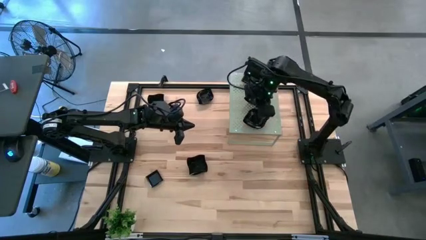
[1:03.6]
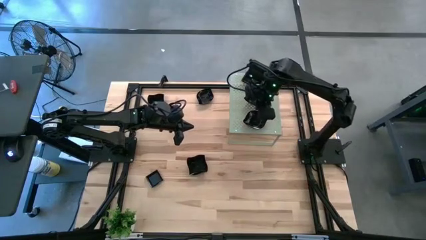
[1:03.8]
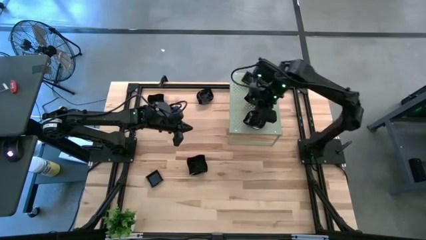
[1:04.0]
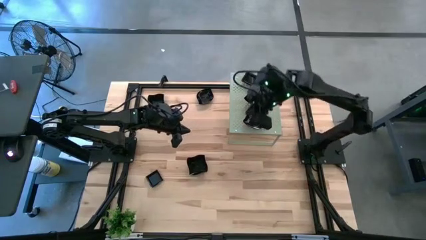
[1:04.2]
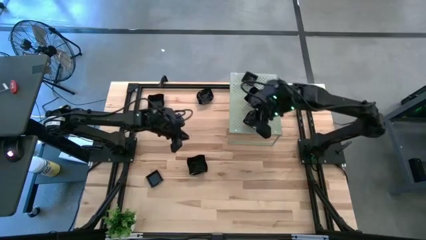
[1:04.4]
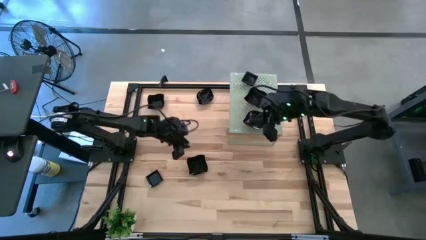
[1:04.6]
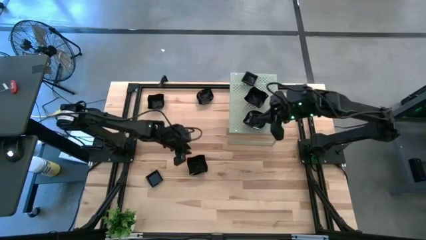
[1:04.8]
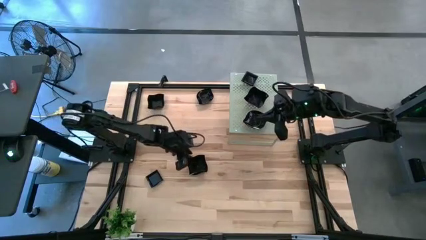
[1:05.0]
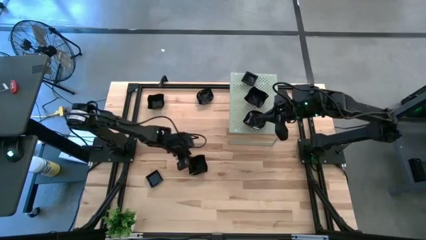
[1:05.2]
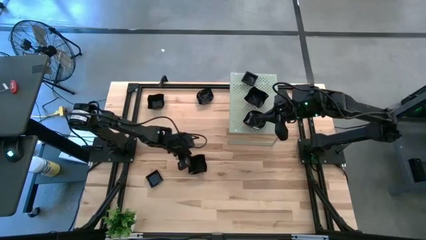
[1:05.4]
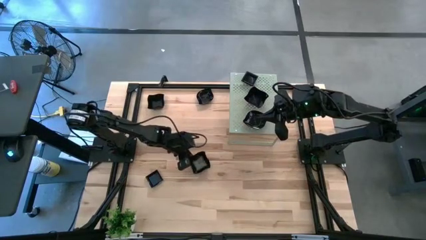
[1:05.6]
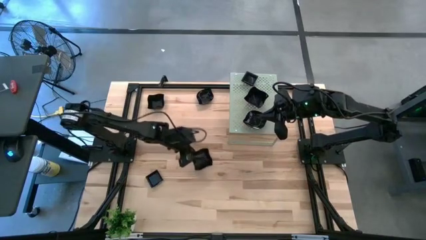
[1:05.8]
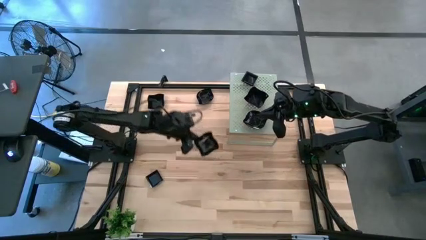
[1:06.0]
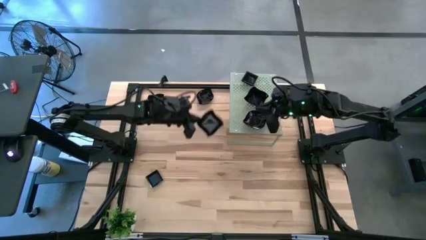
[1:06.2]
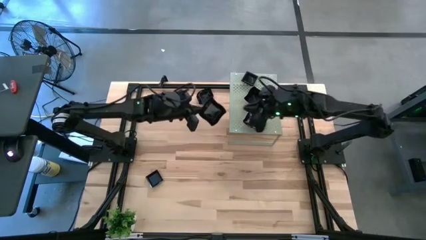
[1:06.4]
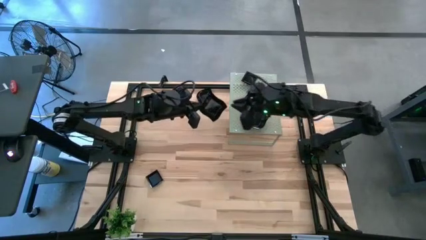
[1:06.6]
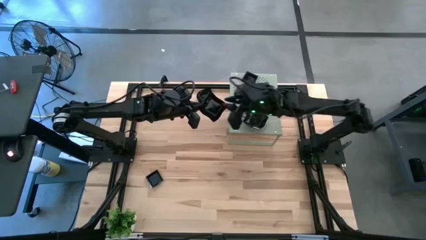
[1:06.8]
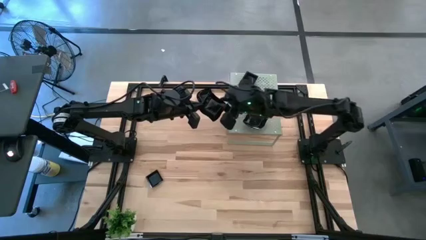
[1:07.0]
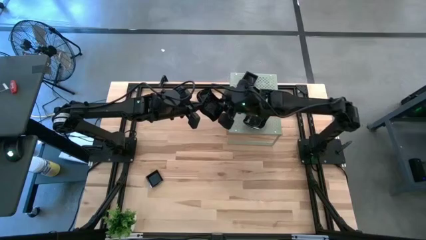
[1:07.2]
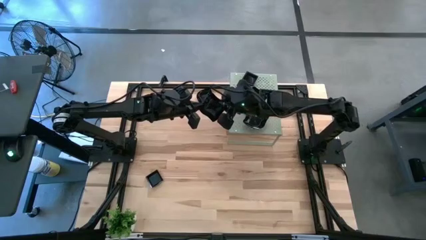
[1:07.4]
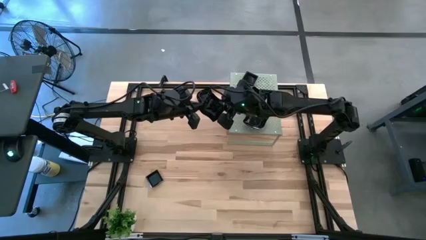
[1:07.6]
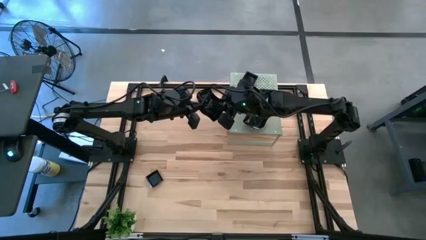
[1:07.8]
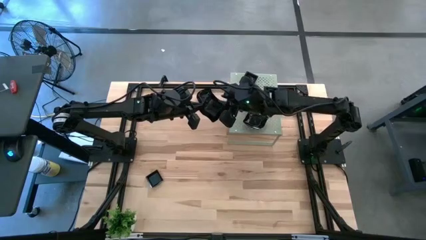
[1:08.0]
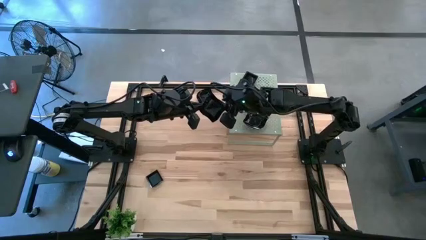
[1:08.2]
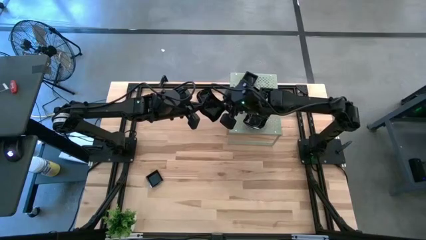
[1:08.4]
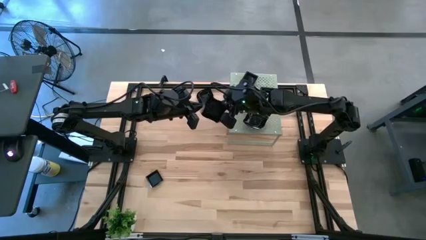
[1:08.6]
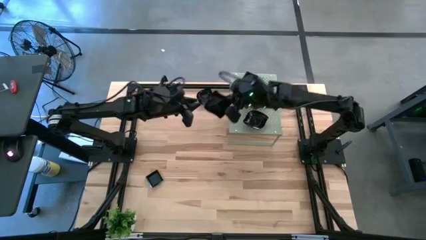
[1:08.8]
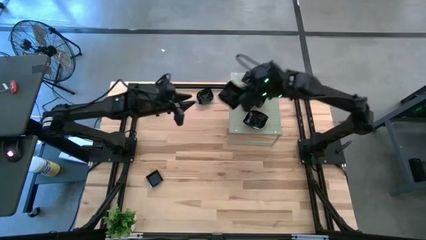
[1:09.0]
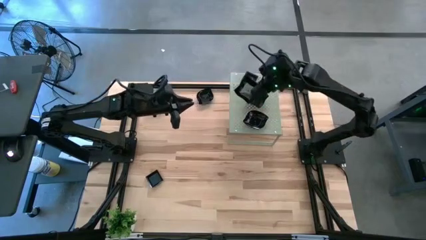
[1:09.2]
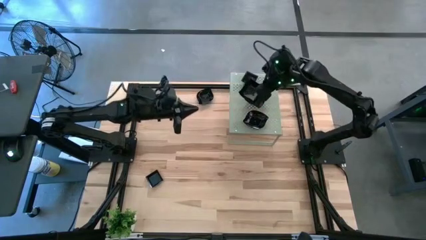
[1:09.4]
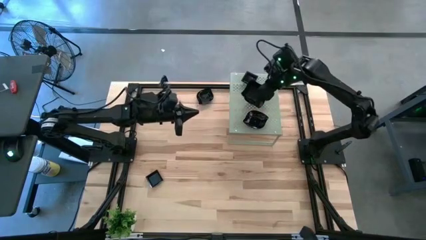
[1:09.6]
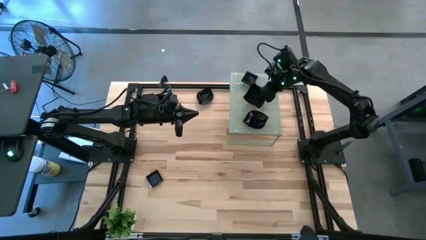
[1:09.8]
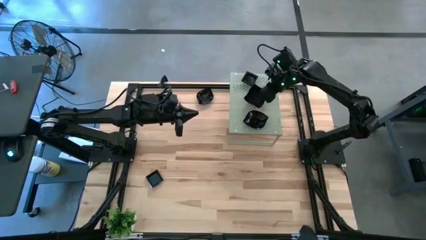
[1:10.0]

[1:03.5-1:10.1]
Task: Pick & Place Mini shaped plates
Stack the black distorted square plate on the black distorted square plate on the shelf

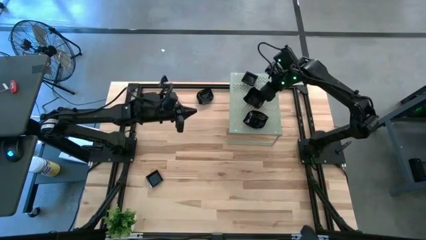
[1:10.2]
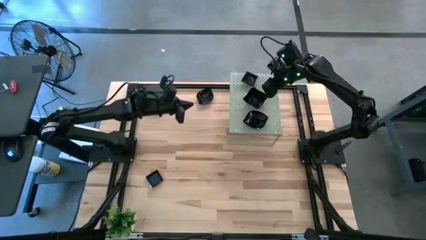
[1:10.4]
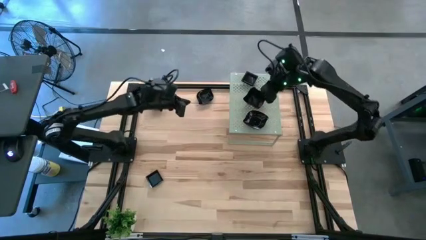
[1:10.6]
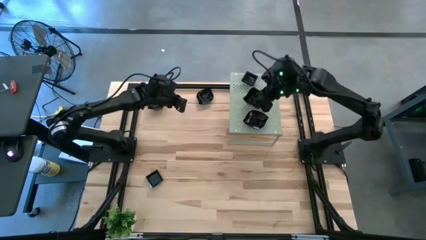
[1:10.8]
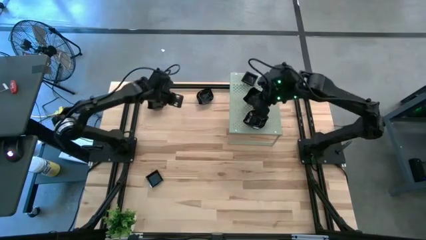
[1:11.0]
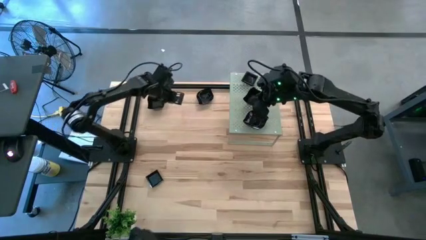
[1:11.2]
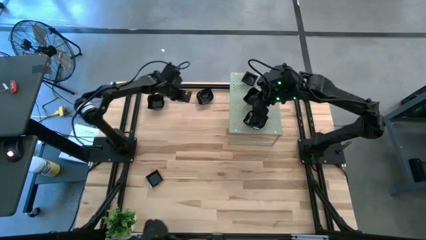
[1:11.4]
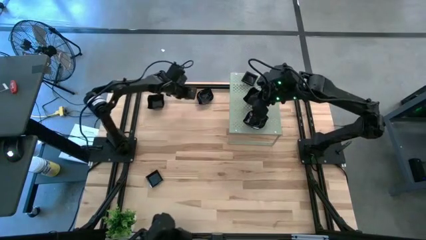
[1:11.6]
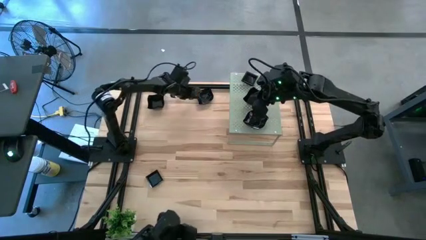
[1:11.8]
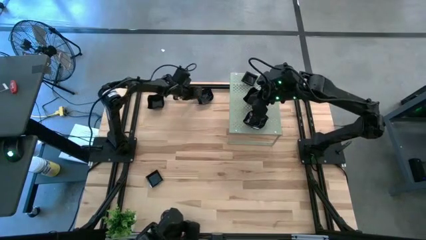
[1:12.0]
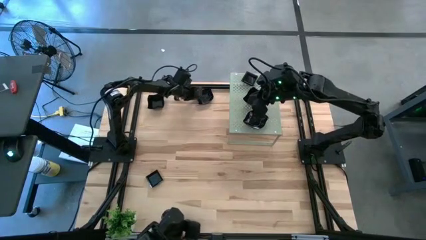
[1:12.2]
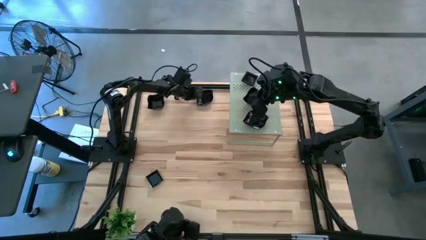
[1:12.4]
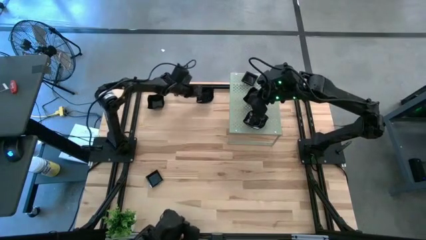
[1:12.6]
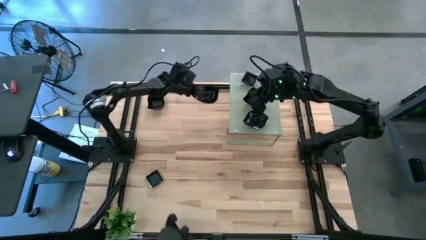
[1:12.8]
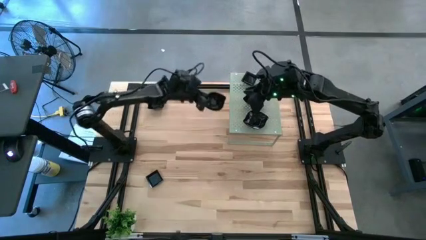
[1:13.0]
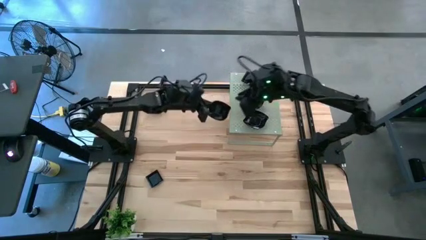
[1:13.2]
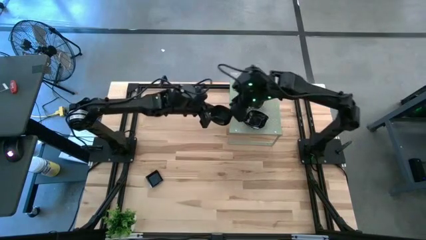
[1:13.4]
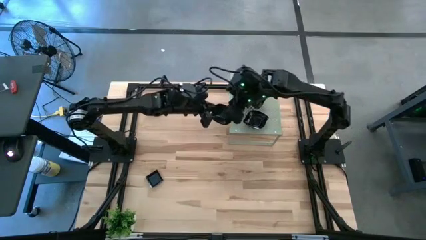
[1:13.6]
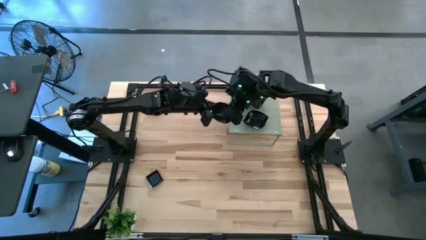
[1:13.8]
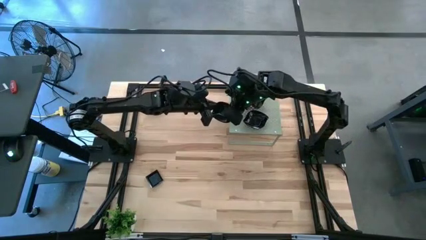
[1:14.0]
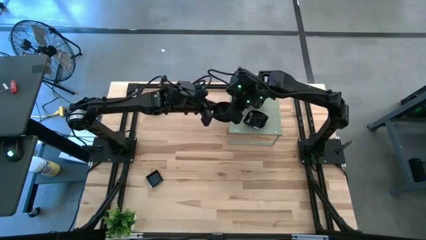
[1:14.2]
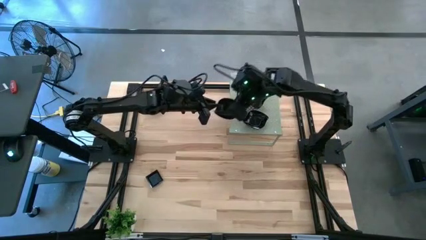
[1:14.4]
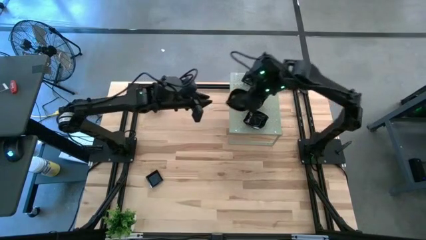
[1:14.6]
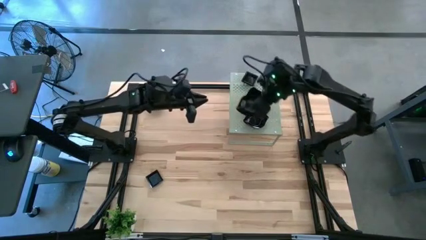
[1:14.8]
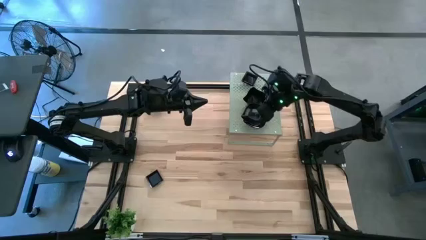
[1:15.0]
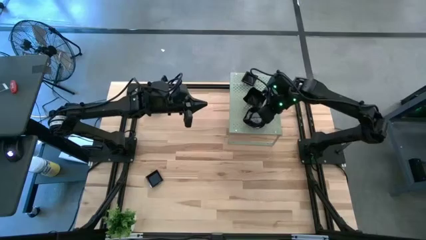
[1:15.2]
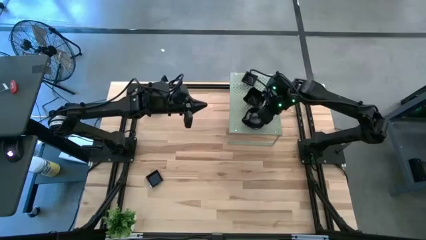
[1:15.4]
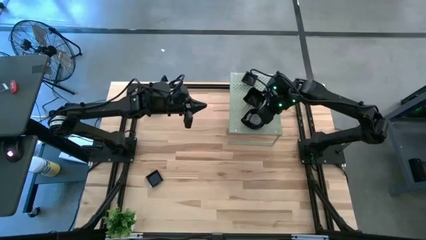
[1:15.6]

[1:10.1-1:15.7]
Stack the black leaf-shaped plate on the black leaf-shaped plate on the shelf

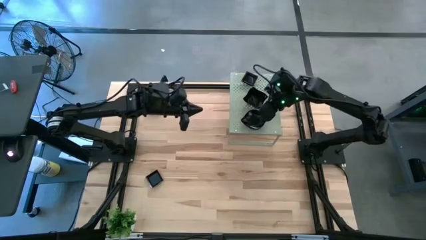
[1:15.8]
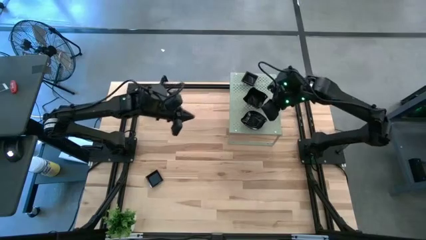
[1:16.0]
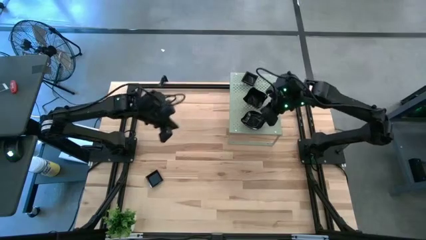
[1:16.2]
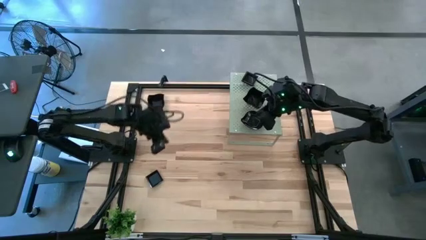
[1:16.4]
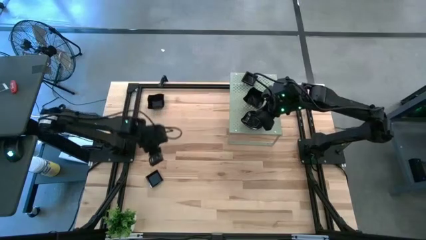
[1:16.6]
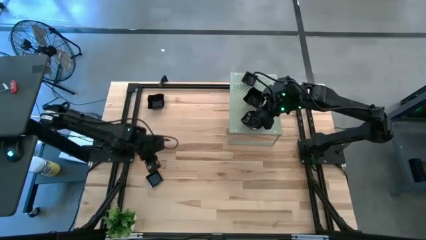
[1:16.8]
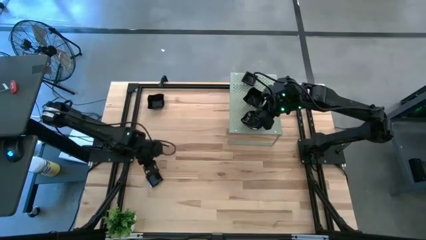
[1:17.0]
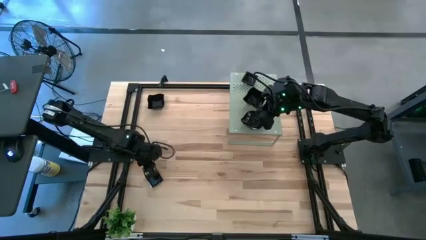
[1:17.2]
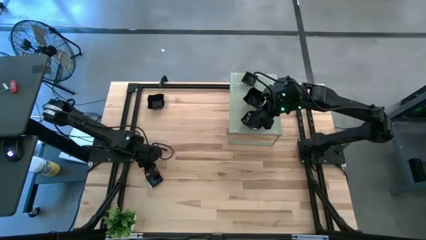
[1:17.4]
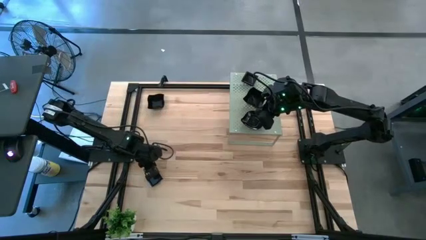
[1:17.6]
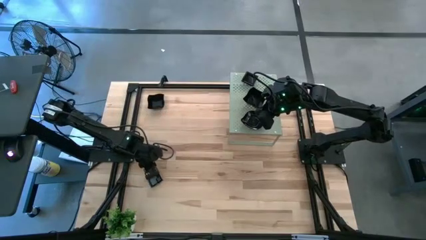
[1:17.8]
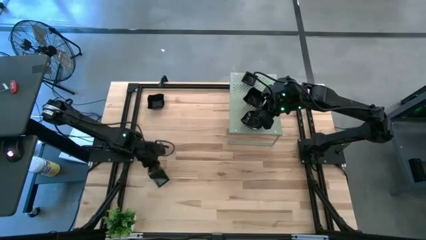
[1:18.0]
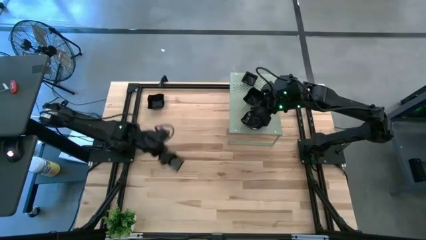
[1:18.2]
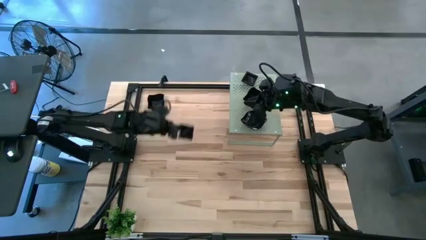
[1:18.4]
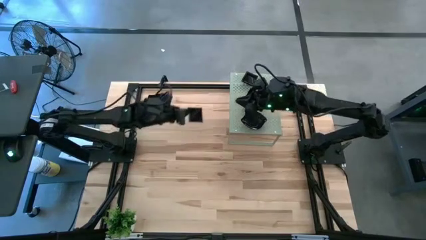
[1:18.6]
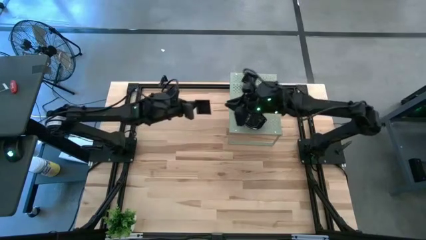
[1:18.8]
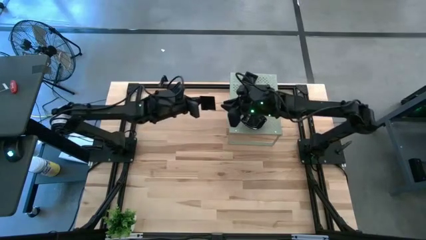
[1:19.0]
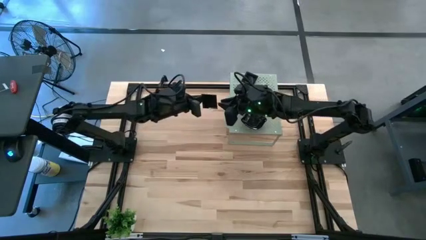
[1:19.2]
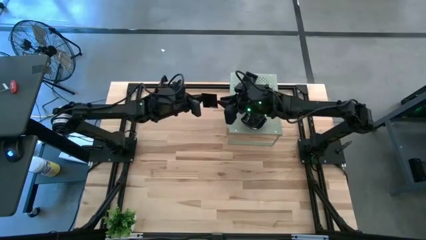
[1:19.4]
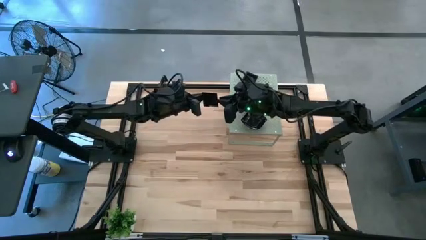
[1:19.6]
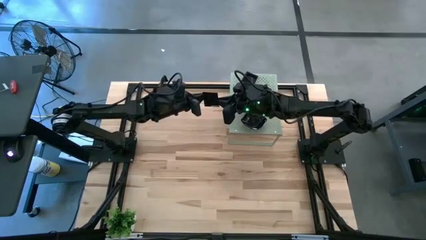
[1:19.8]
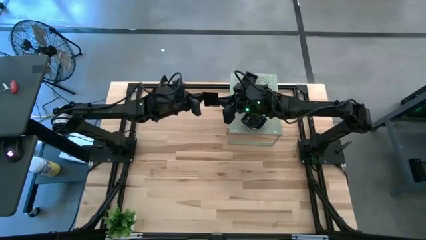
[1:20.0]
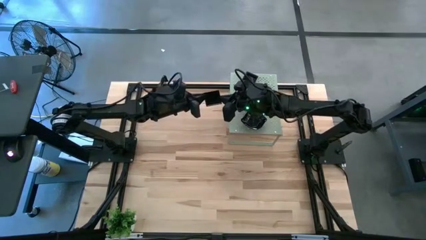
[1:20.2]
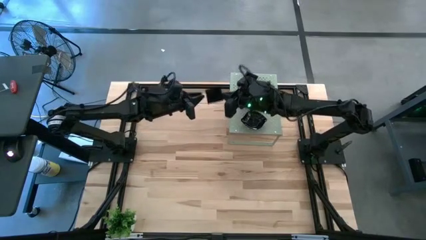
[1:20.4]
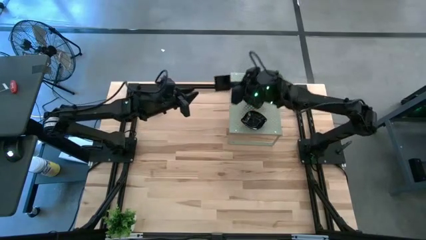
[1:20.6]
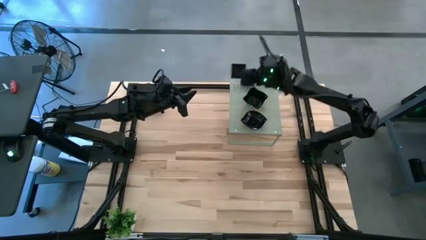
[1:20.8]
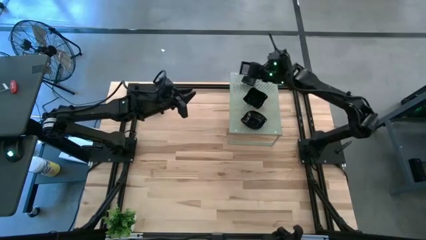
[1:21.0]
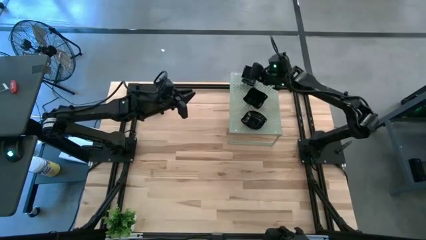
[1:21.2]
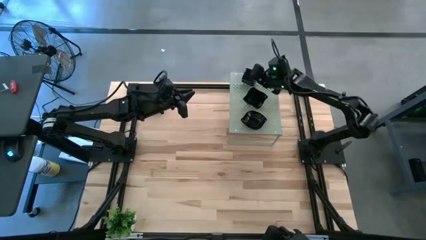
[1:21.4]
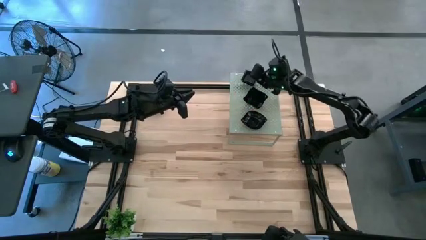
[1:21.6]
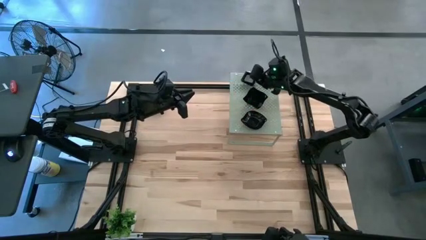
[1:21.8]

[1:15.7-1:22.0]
Stack the black square plate on the black square plate on the shelf
